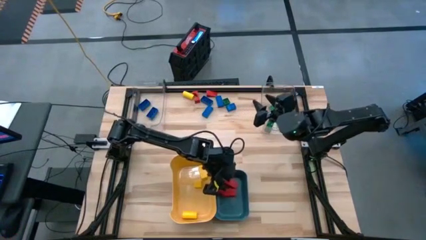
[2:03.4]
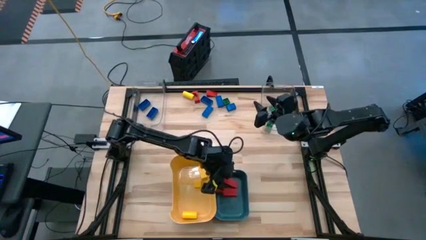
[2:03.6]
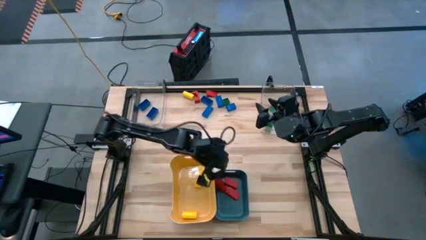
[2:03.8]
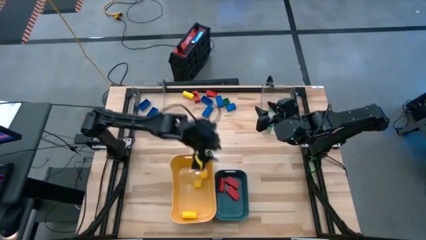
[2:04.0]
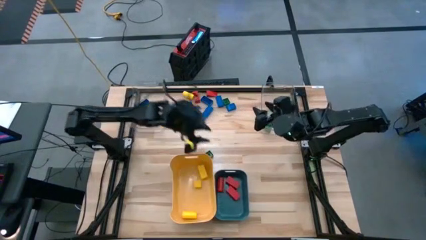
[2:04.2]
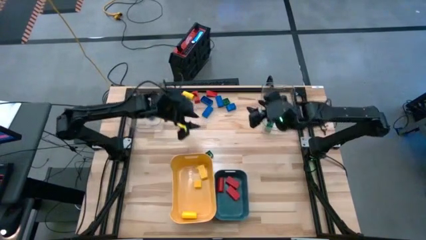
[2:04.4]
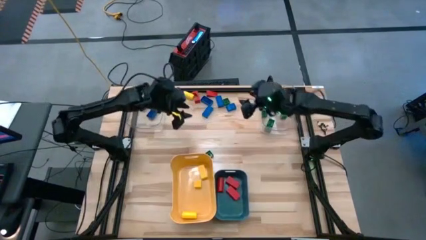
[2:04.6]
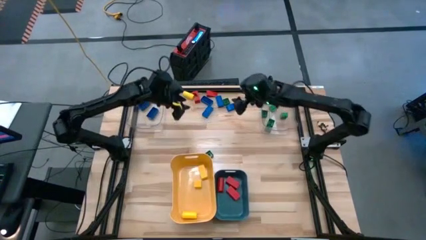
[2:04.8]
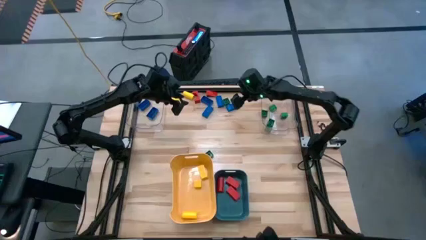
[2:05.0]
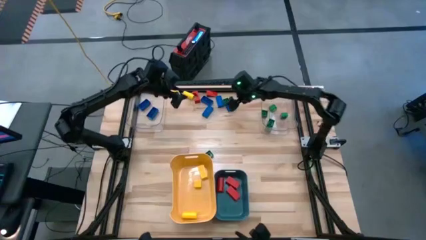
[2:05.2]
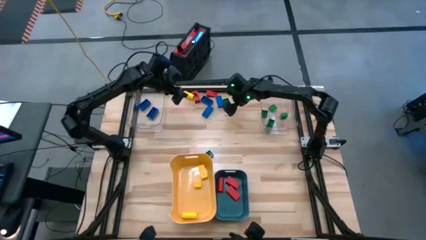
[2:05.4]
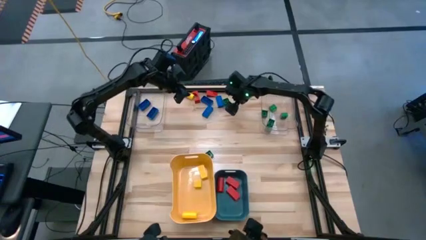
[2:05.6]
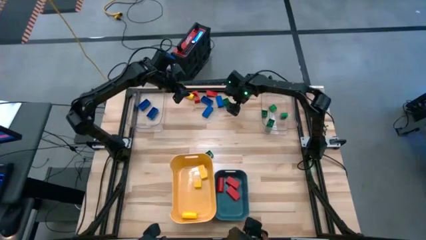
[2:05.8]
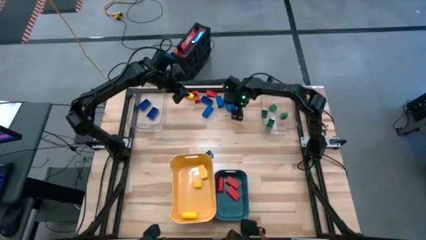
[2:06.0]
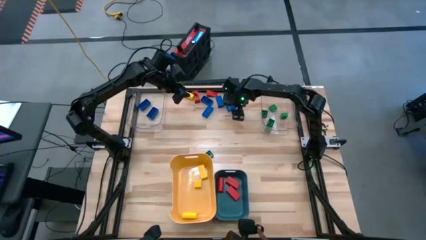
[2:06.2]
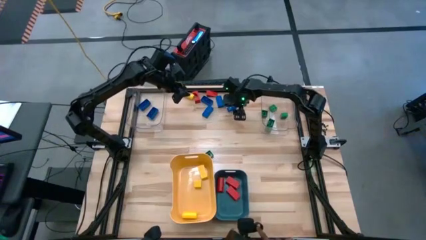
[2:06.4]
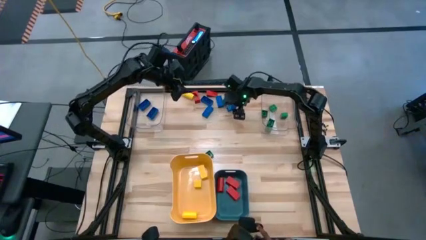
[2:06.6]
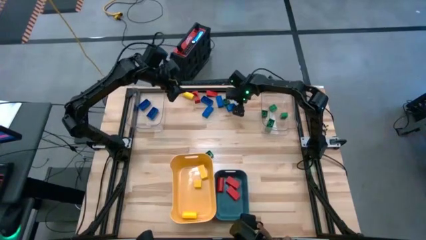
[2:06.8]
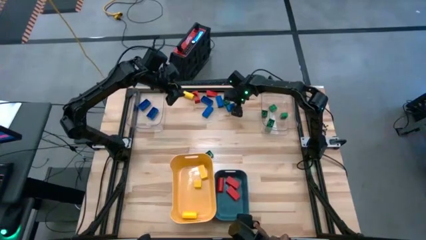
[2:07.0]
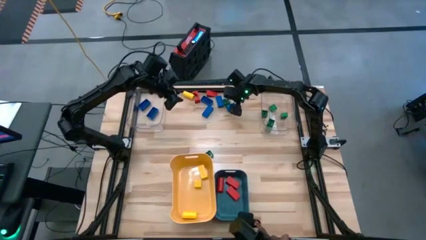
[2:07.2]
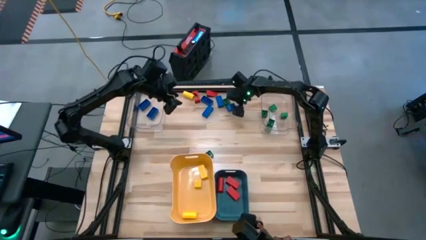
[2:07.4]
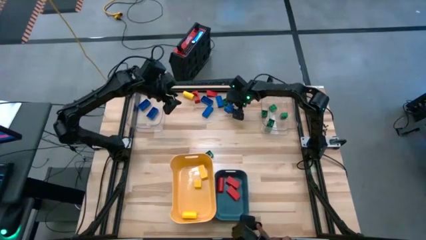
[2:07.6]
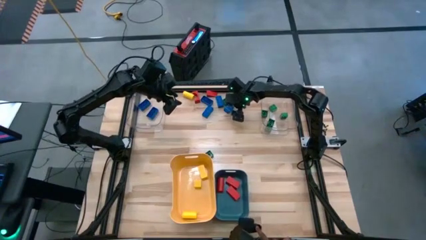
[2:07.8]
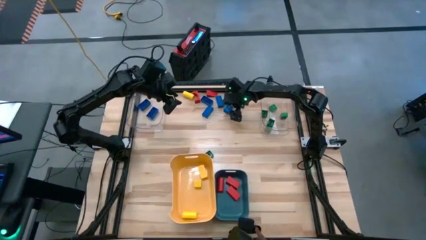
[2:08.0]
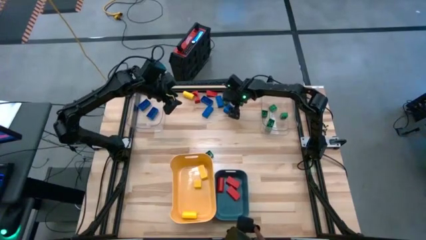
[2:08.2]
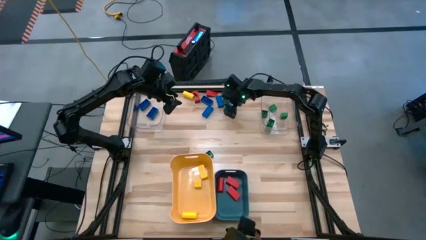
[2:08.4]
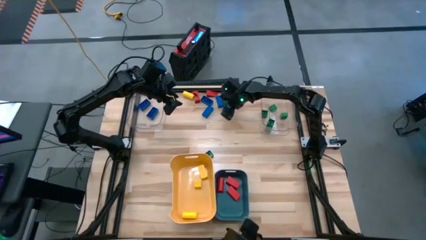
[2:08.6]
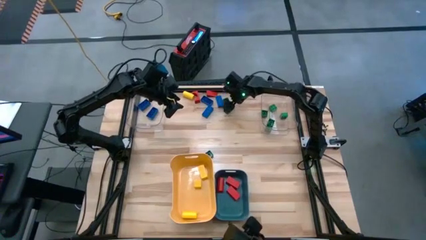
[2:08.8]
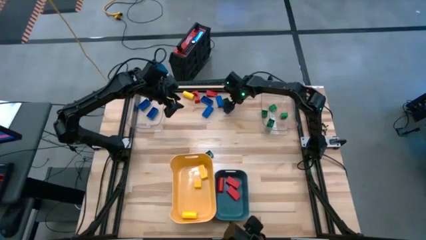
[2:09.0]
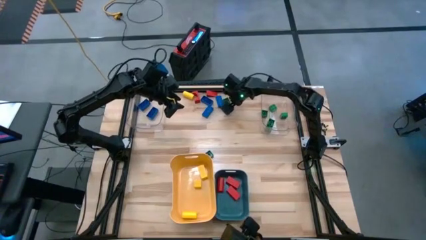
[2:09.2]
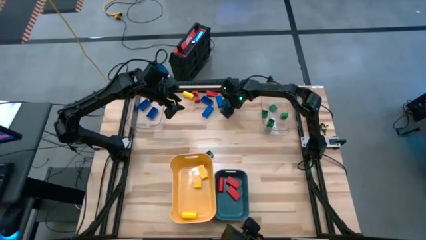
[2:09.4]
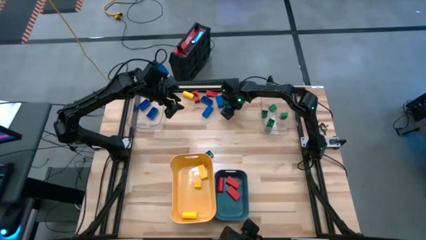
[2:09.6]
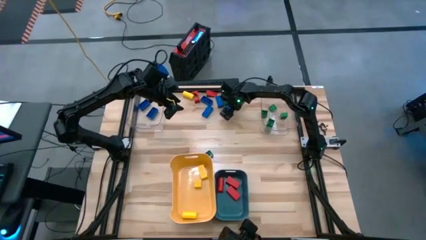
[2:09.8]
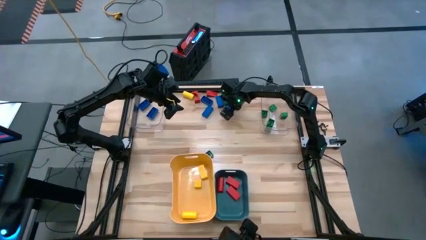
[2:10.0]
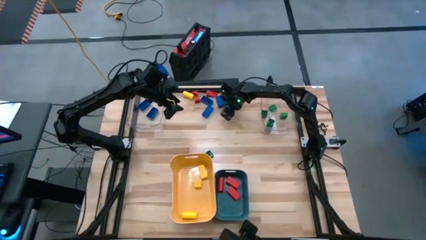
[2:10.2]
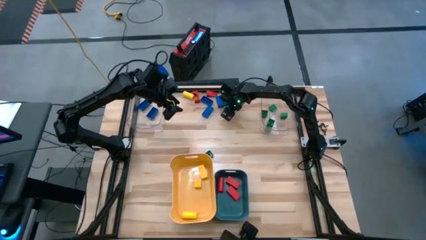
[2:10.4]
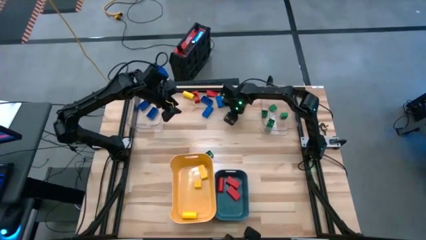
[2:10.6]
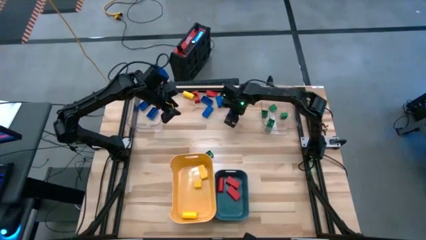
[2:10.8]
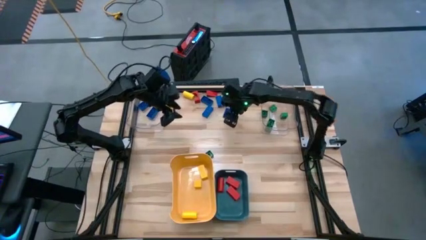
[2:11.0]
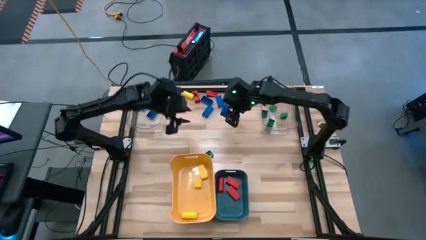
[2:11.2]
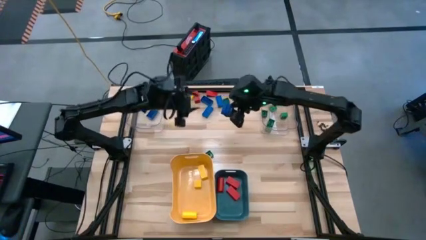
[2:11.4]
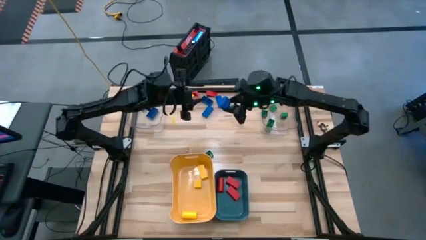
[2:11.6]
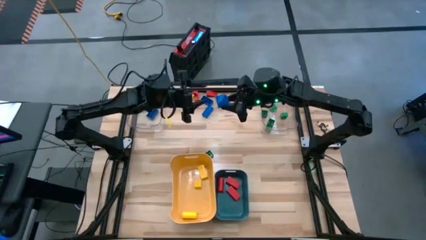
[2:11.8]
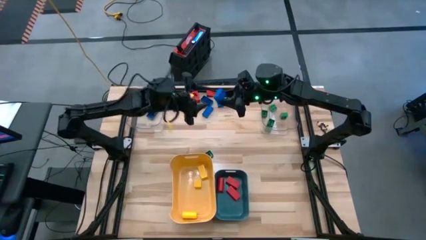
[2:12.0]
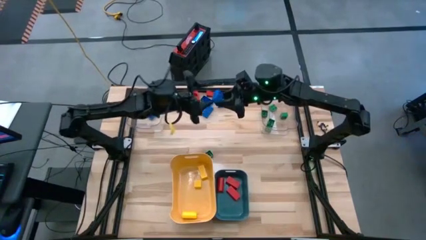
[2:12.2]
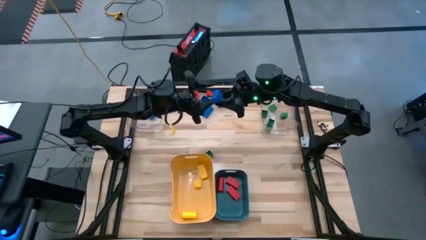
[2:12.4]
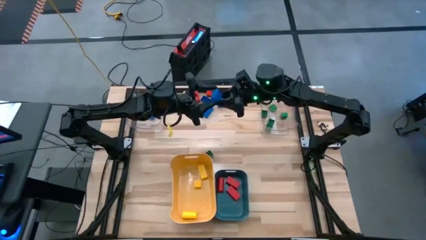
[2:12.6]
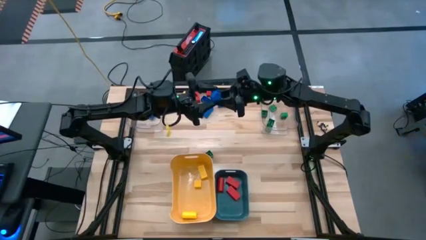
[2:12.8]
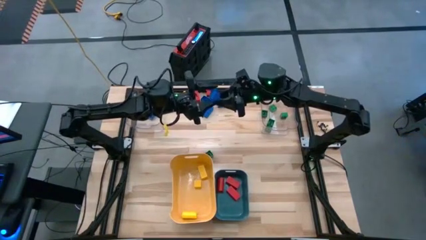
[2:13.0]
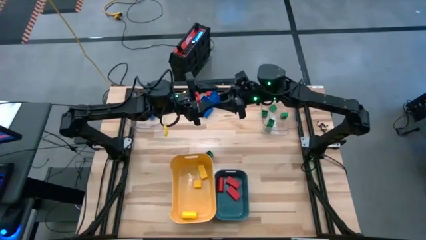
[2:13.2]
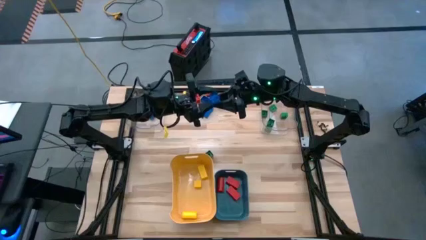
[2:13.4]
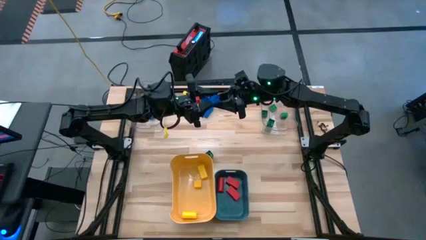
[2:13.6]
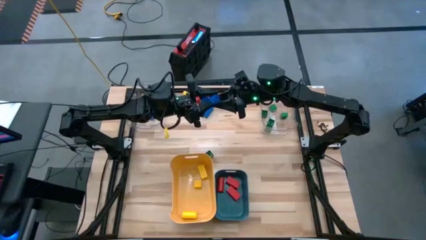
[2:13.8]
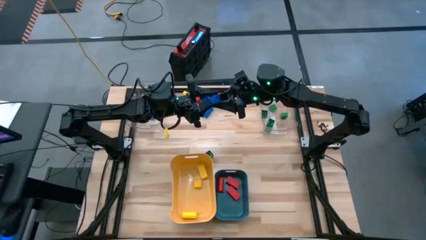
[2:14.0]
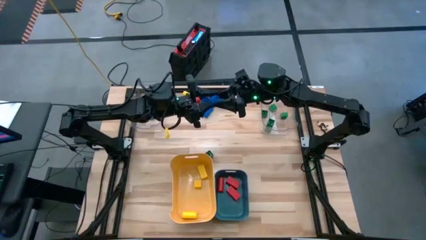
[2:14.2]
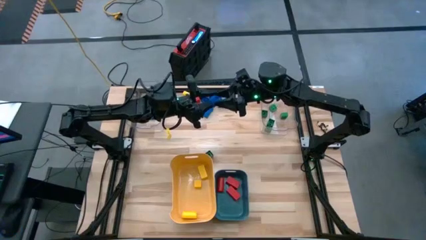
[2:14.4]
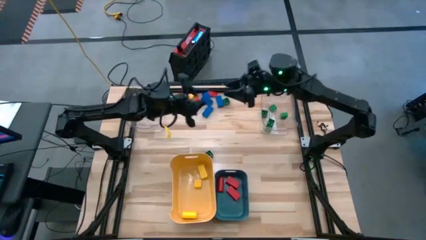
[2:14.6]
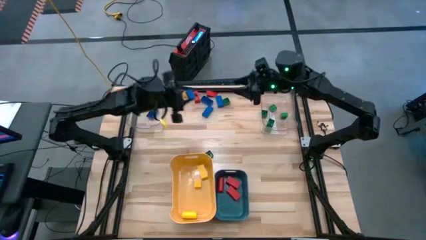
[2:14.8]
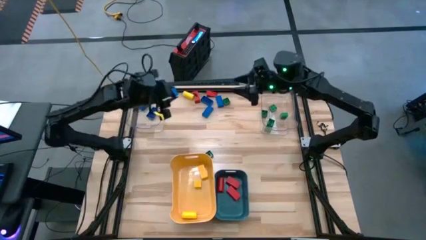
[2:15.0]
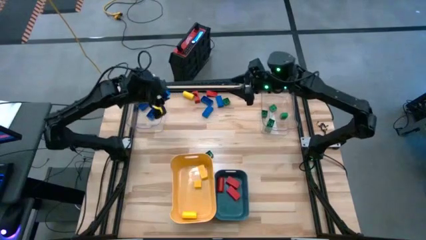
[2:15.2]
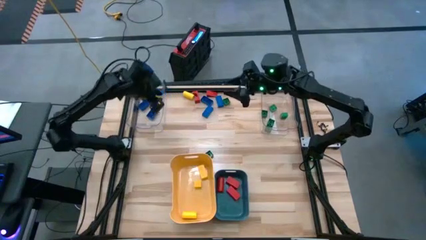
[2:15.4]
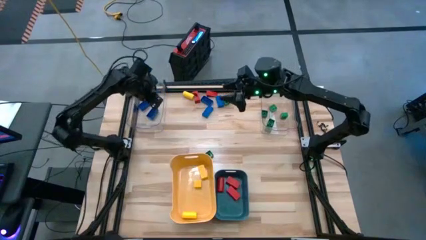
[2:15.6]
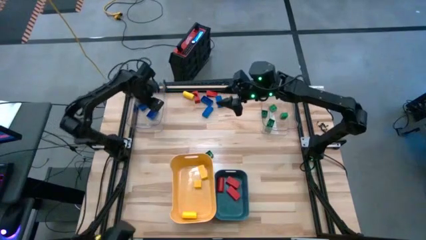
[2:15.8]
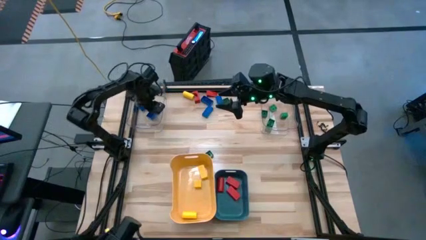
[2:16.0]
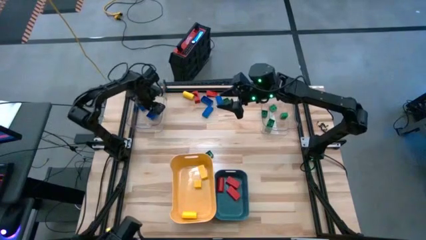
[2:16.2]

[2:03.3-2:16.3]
Task: Sort blocks
Put the blue game piece into the left transparent bin

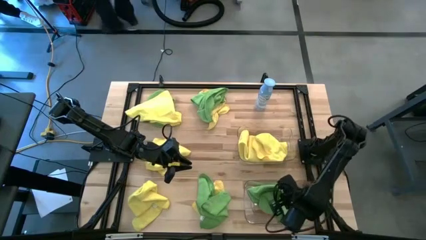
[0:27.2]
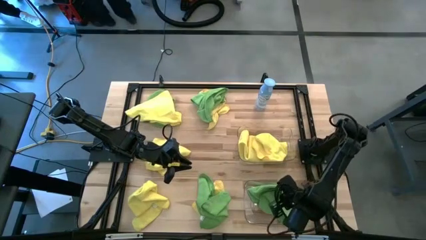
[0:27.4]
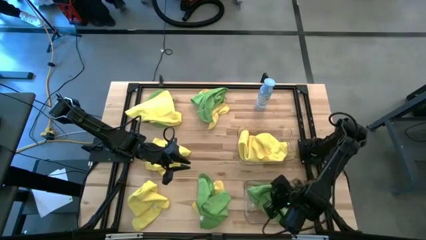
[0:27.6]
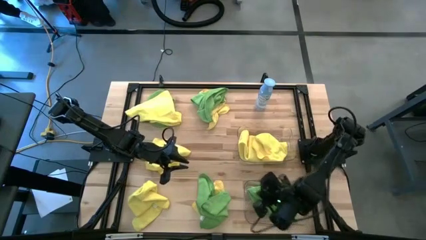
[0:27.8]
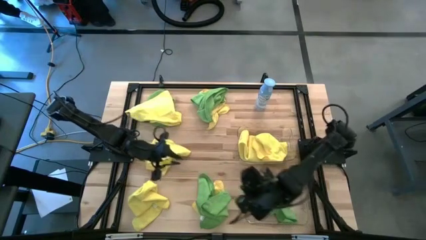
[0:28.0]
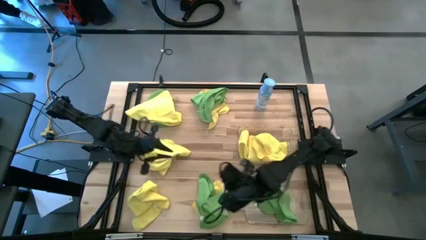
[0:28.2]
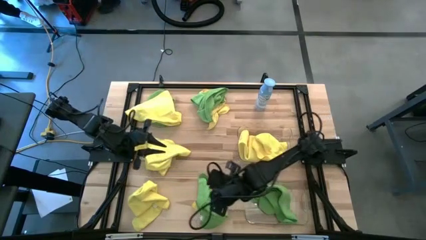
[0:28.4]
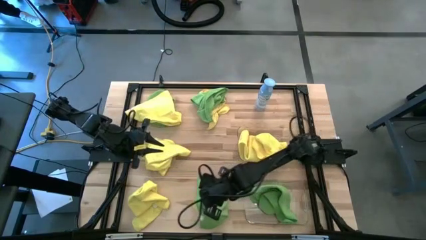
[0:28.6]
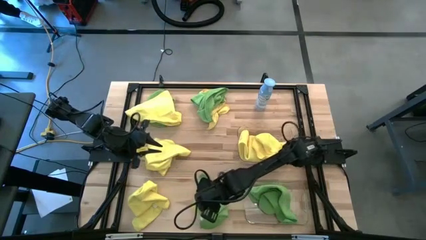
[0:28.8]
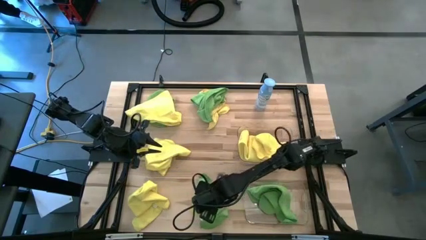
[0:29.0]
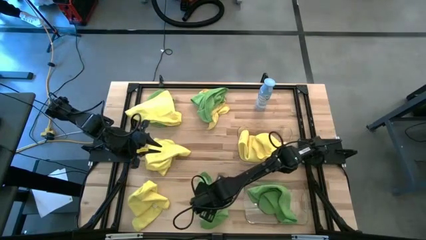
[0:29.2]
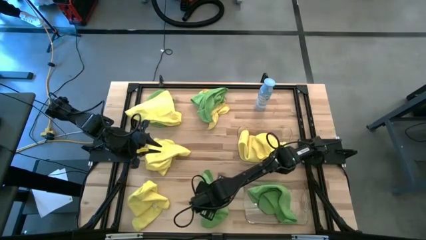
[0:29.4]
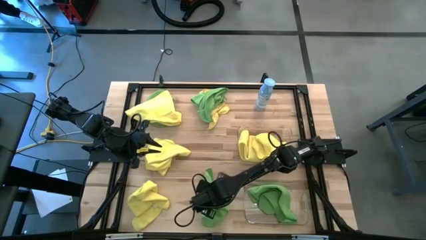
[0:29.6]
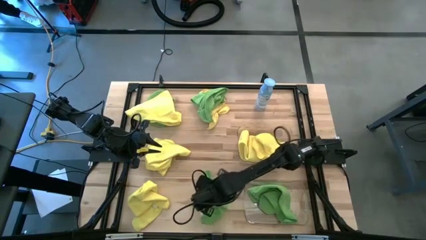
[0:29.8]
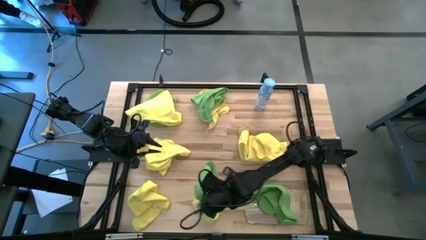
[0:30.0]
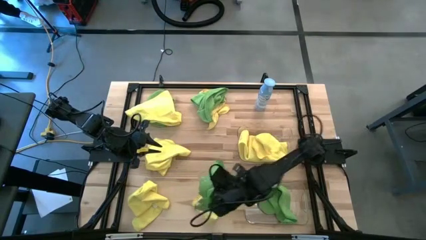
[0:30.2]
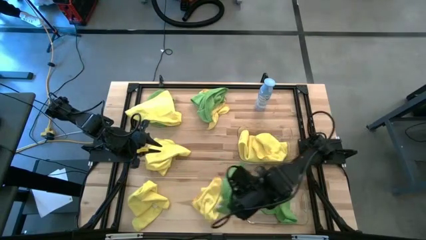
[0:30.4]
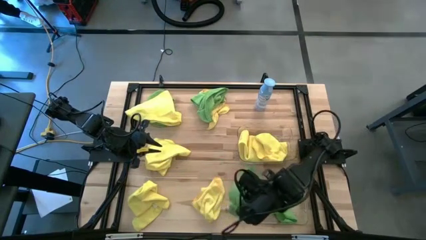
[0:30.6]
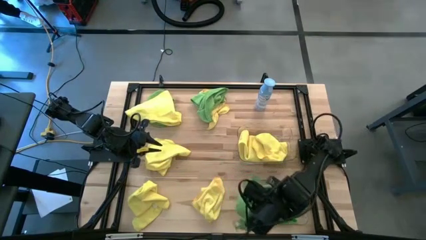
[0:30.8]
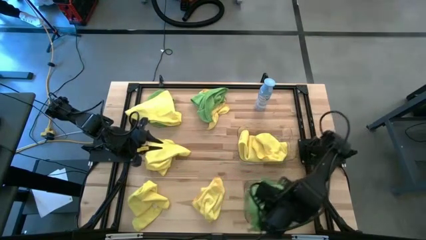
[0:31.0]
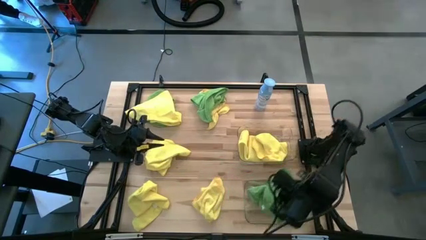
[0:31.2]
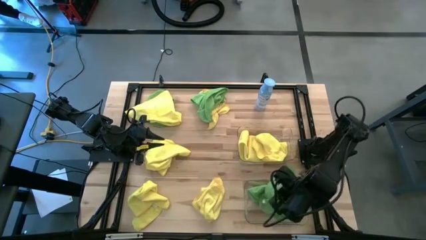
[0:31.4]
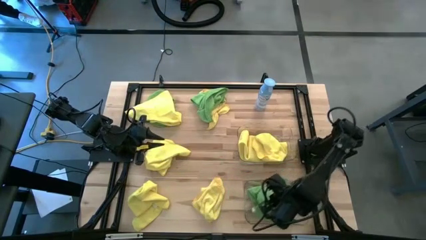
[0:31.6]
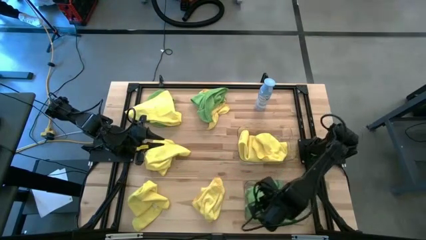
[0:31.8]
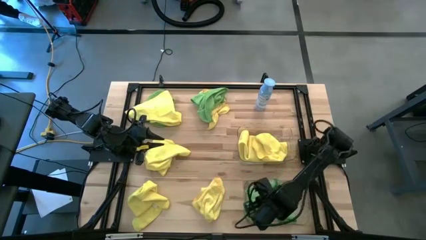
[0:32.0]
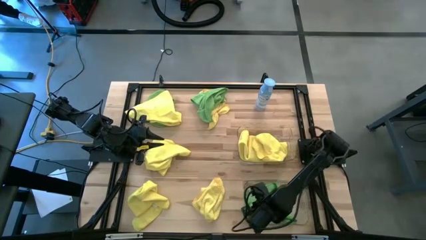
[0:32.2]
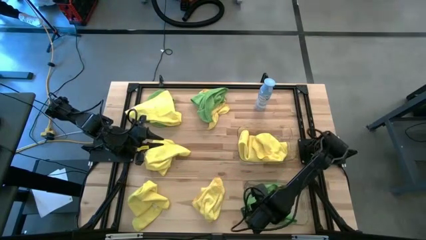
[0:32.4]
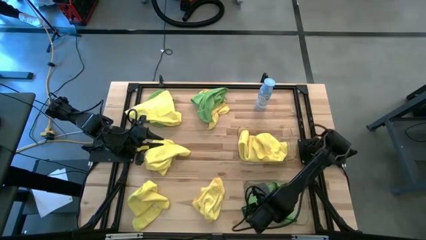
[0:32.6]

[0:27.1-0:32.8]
Task: Sort microfiber towel by color & place in baskets
Put the green microfiber towel into the bottom transparent bin
